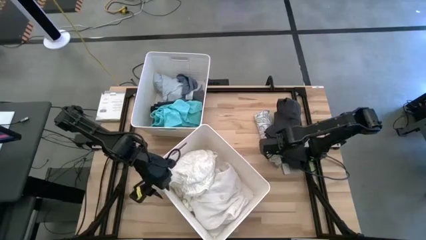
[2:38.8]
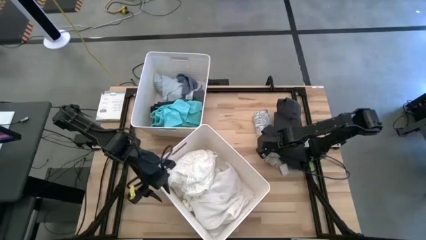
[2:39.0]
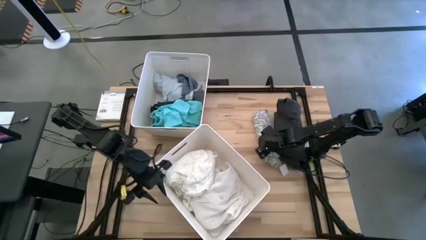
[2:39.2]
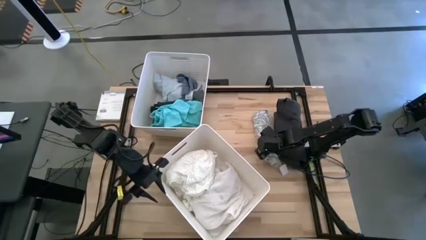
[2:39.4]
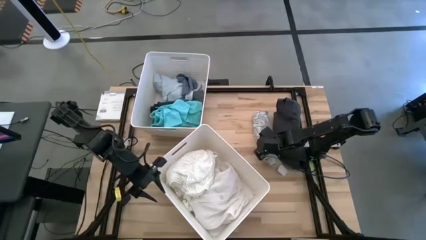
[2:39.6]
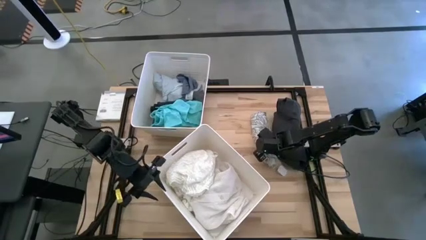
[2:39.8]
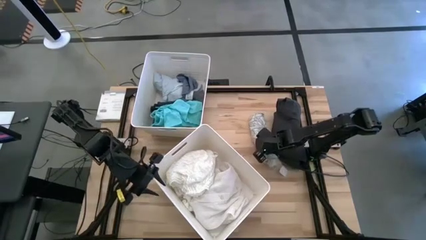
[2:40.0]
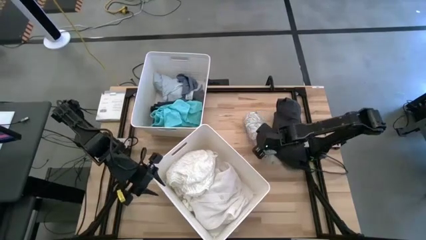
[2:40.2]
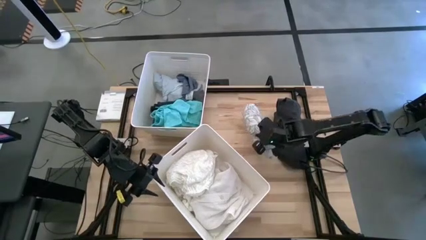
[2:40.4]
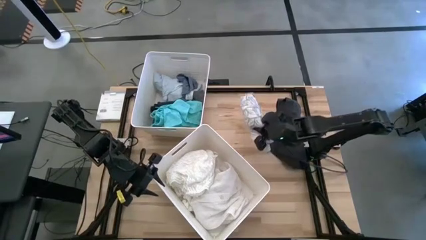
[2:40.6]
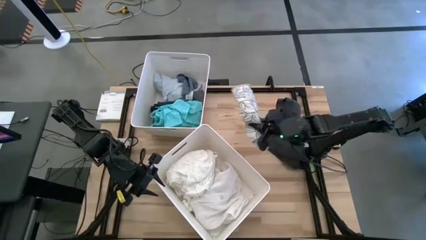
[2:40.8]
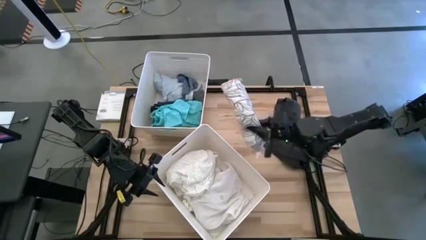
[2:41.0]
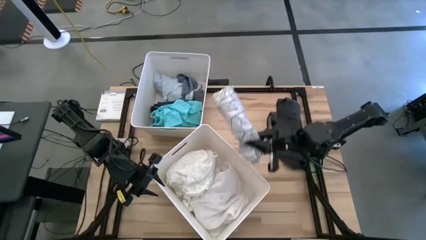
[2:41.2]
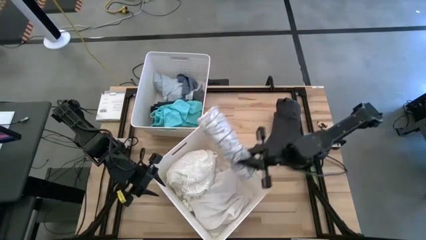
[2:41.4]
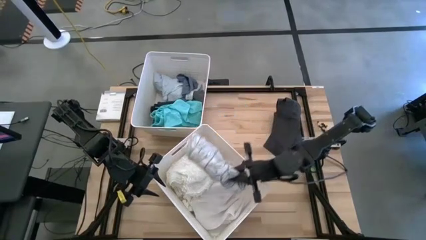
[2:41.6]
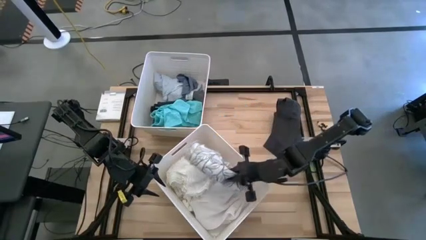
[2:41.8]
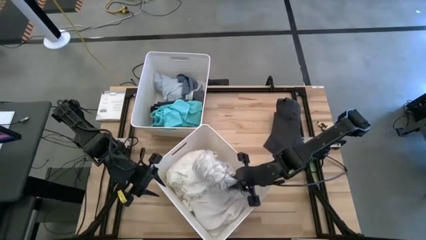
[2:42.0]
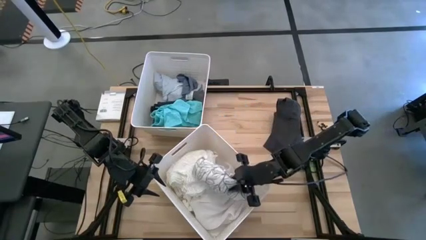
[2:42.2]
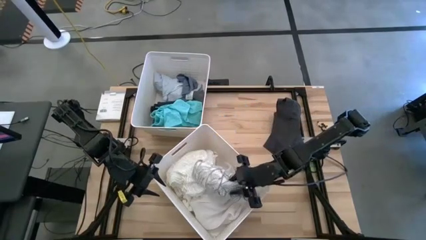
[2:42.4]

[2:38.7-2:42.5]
Task: Sort clothes
Put the white shirt into the bottom white laundry bin

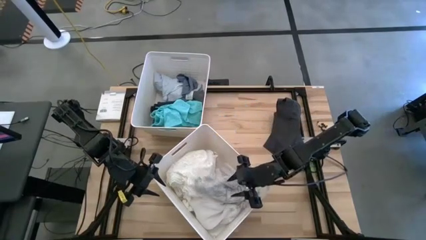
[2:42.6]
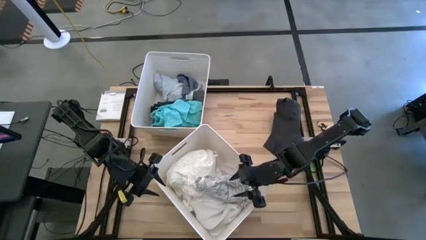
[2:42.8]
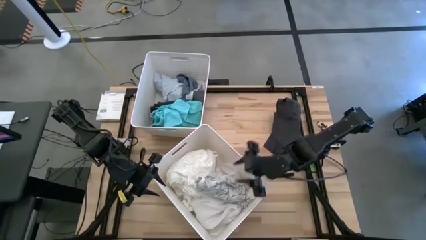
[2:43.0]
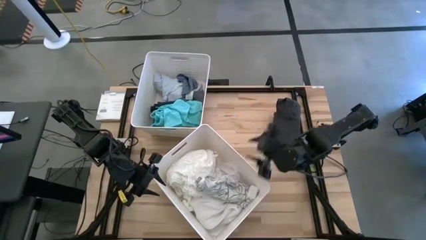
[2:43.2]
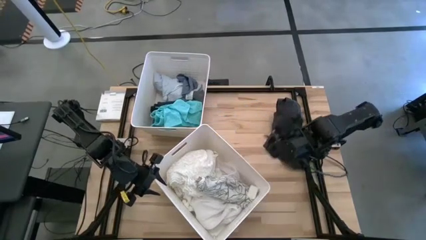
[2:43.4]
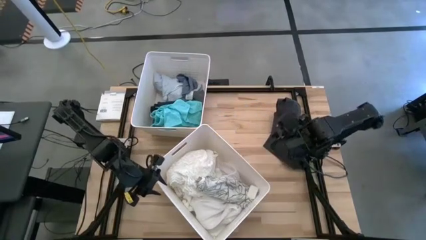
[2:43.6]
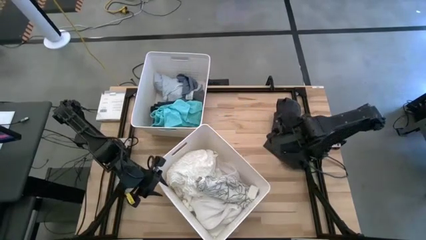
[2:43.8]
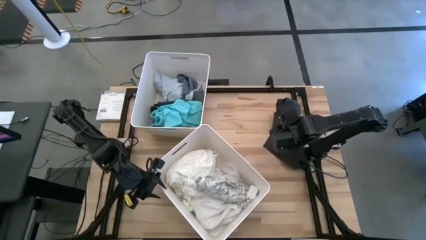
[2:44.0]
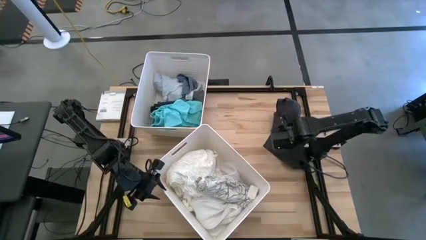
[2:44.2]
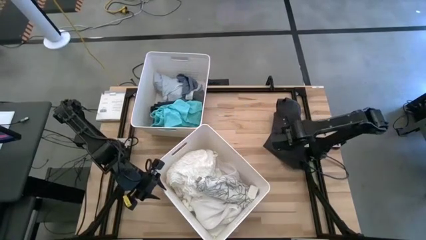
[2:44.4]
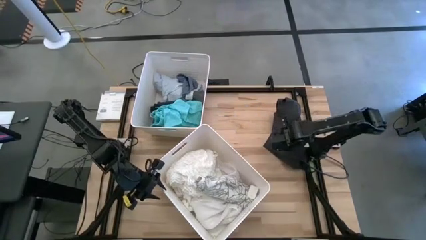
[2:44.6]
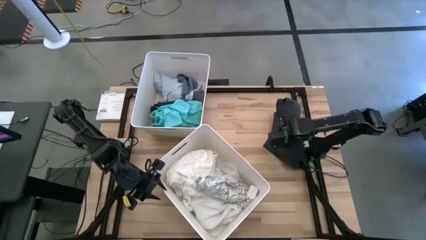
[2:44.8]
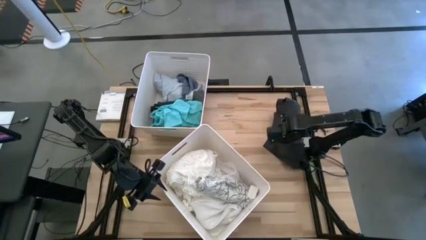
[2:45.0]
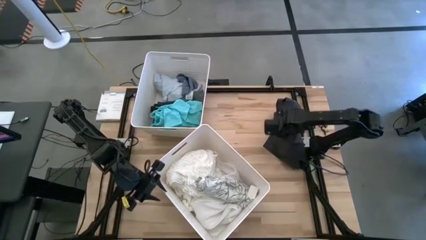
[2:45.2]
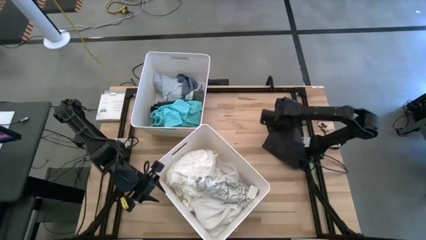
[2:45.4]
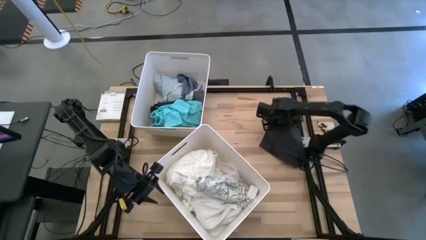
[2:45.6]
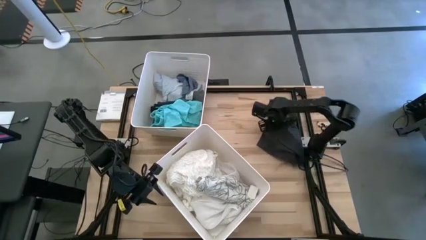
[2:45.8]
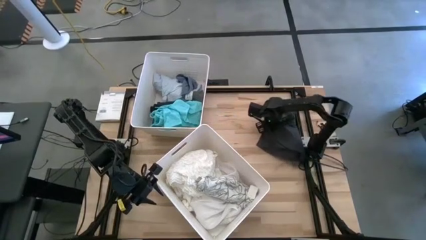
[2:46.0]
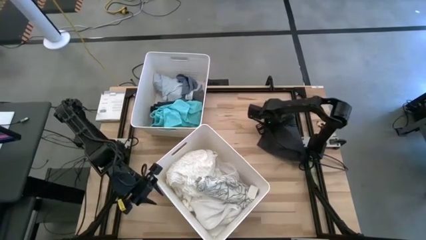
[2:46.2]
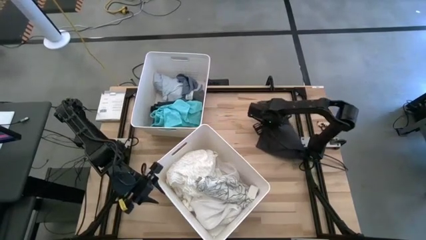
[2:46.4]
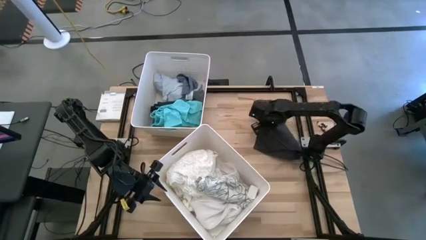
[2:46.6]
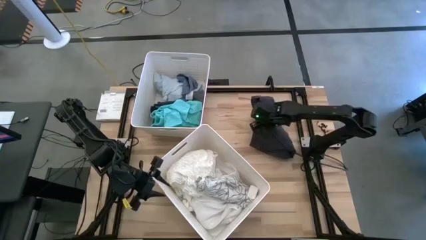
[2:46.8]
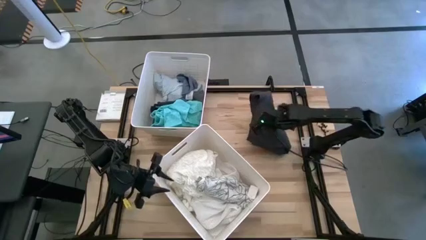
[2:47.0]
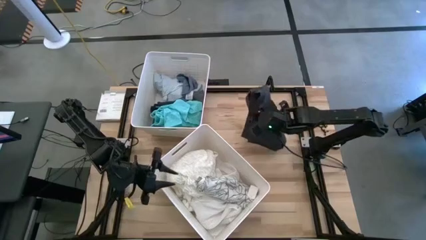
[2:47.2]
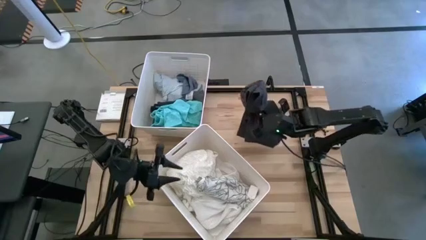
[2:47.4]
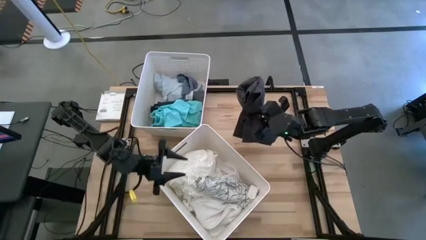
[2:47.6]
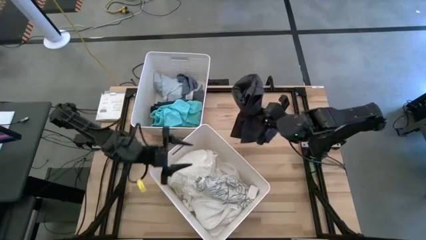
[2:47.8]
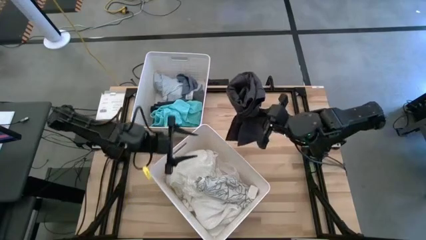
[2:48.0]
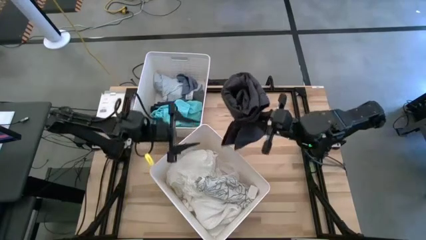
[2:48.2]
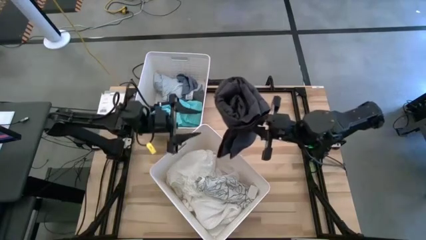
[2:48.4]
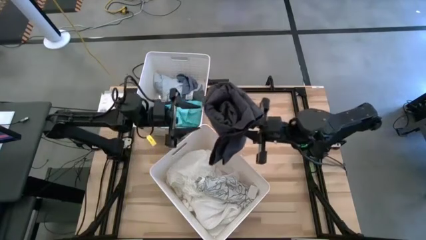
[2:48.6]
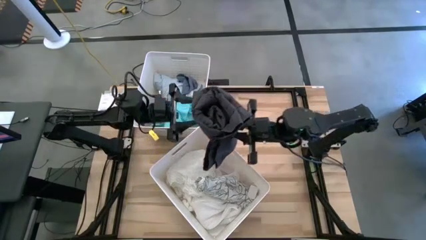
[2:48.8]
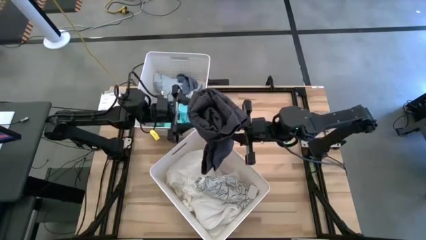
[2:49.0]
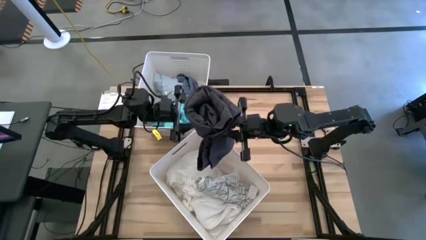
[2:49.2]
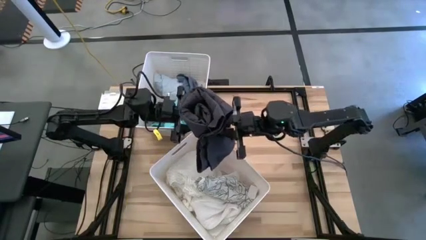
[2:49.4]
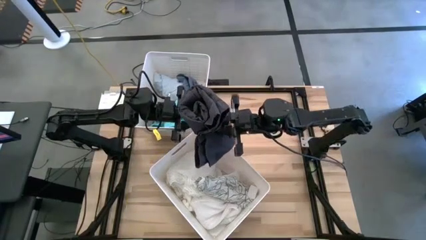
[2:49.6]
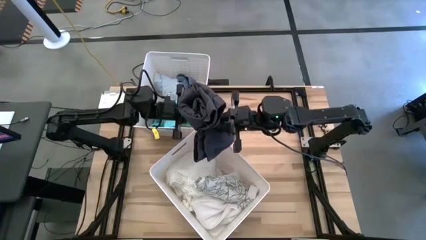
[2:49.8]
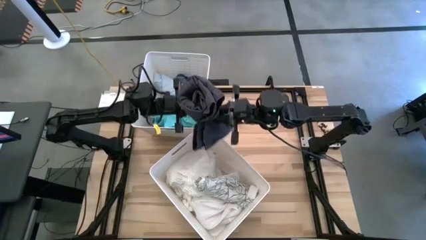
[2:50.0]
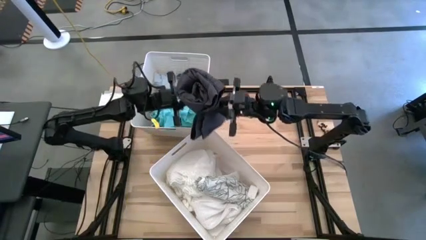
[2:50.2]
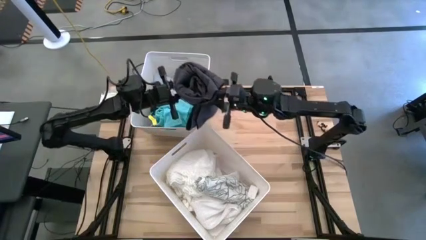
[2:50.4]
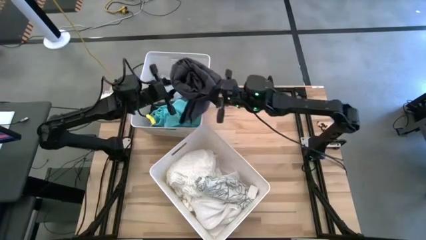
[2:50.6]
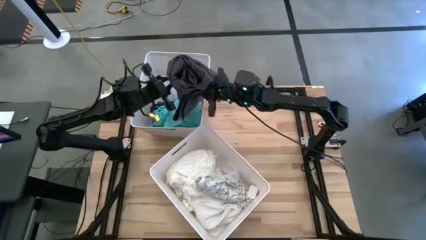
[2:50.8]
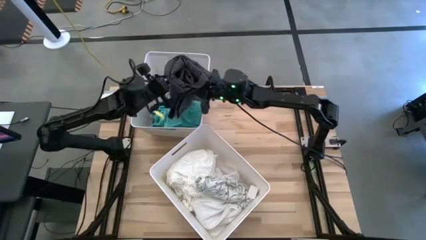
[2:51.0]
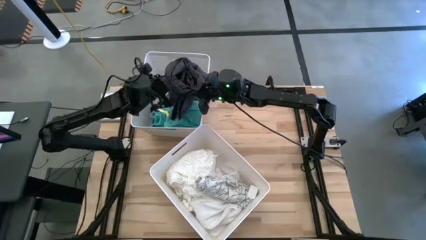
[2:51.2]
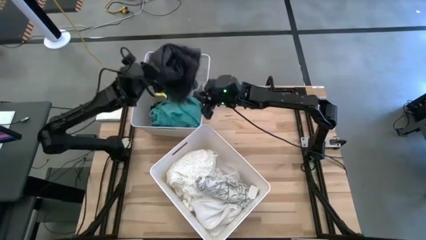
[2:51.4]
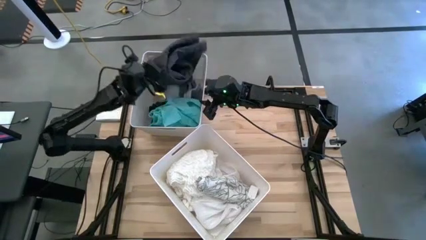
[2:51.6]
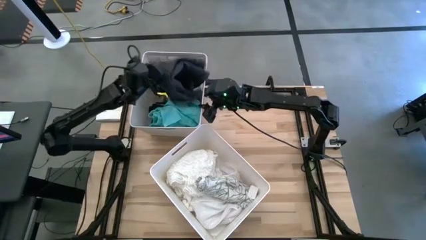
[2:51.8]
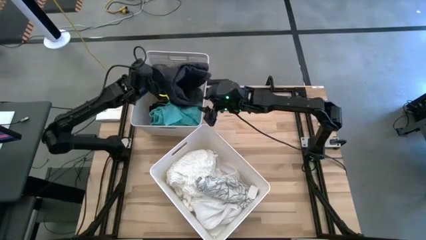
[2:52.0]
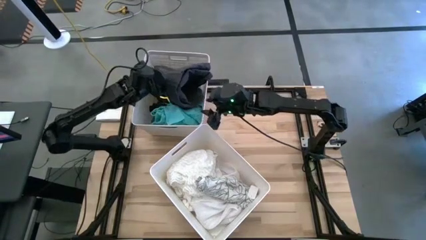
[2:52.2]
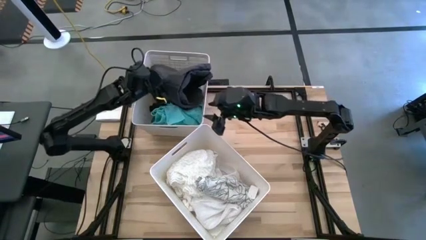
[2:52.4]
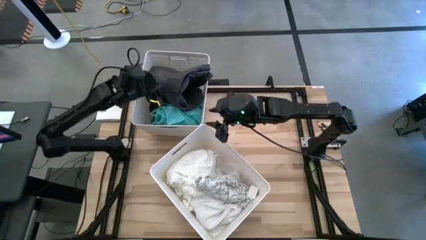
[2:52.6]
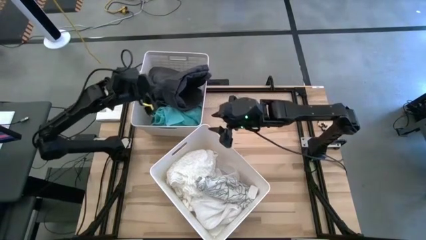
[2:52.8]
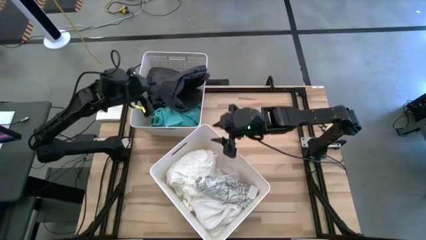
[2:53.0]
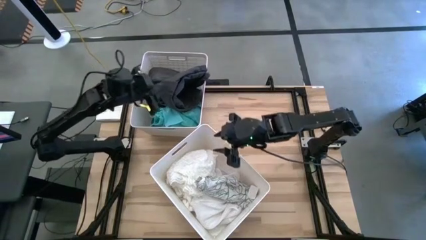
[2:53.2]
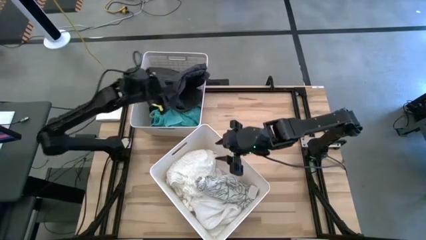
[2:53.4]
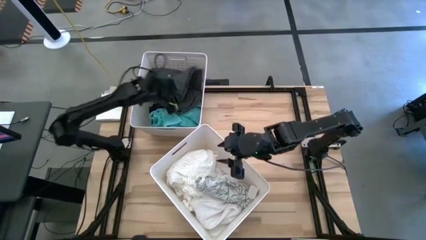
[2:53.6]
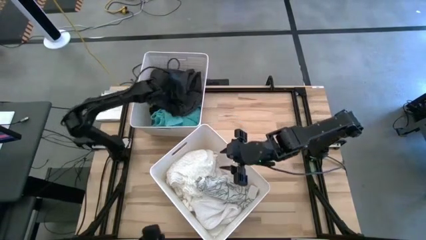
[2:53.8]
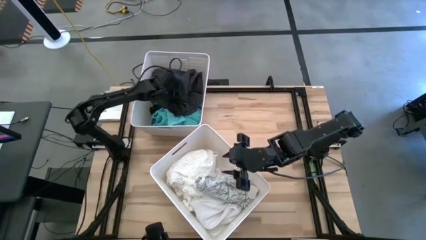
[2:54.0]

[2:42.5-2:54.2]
Put the black shorts into the top white laundry bin

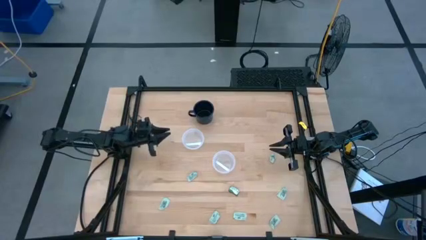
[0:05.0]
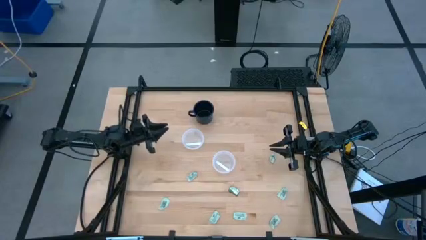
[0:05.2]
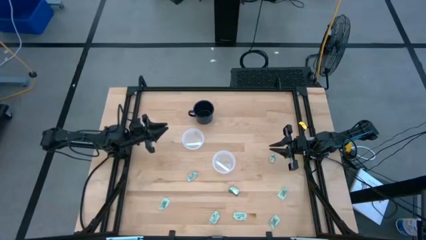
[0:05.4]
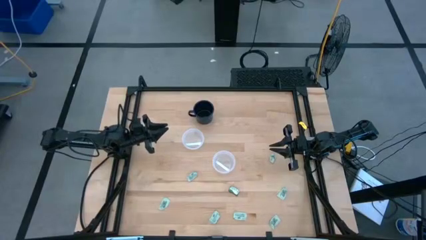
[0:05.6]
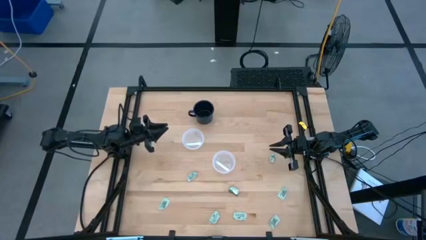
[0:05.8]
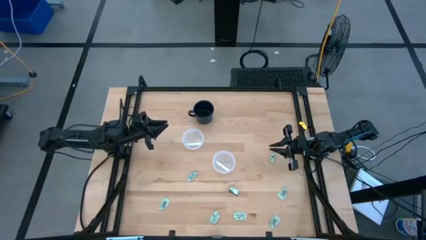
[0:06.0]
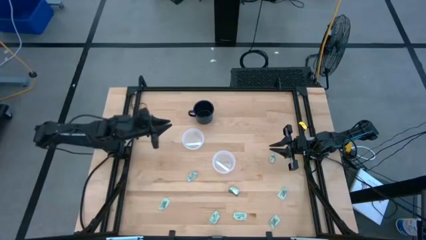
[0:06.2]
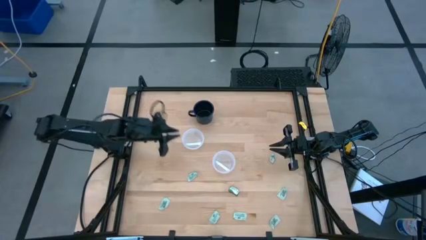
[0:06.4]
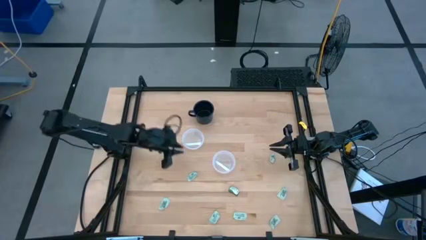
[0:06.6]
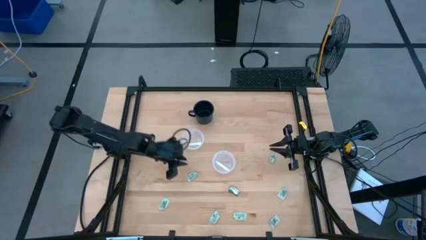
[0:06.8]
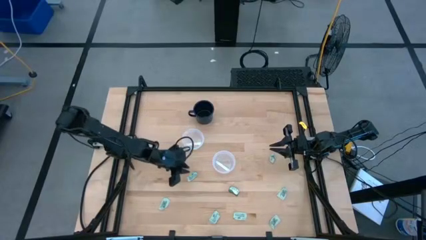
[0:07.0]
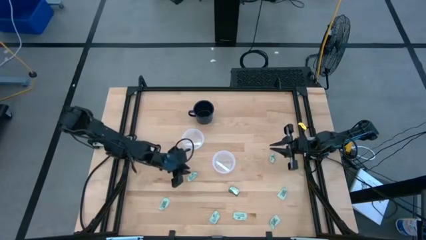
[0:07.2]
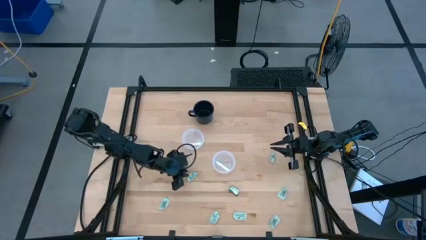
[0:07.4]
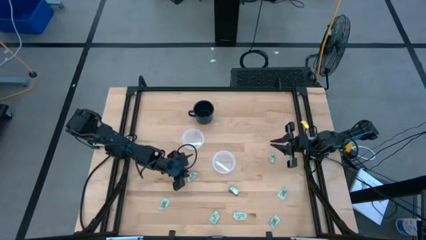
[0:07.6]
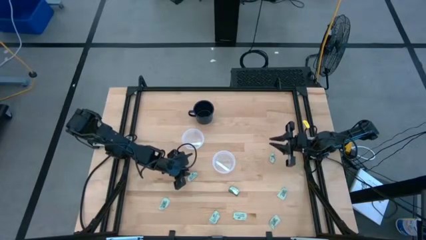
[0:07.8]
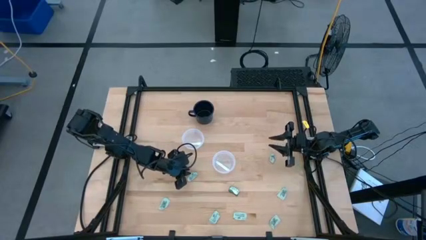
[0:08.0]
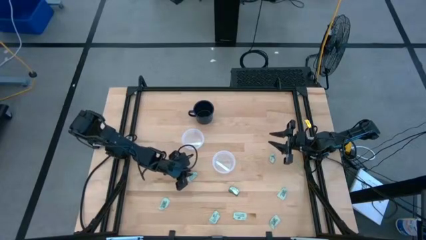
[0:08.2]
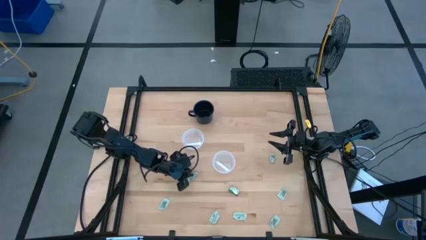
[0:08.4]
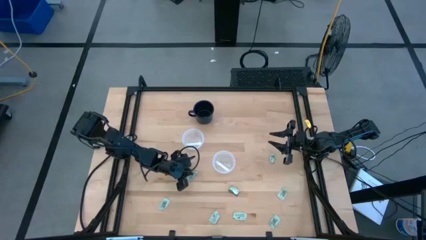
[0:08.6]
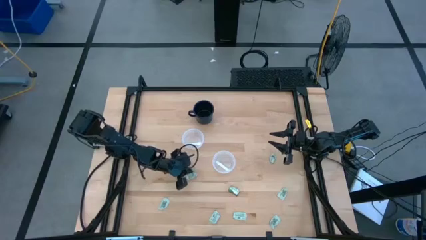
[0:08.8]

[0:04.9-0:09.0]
Task: Pick and place Stevia / Truvia into bins
Put the stevia packet into the top round transparent container
